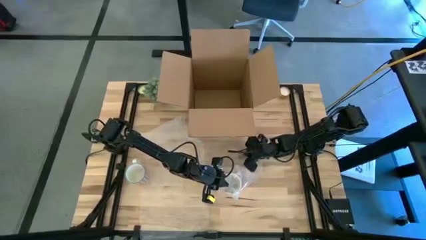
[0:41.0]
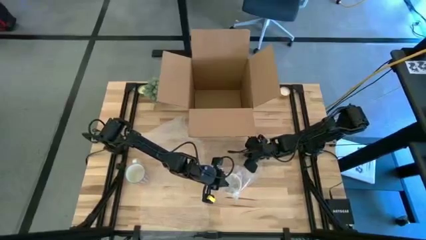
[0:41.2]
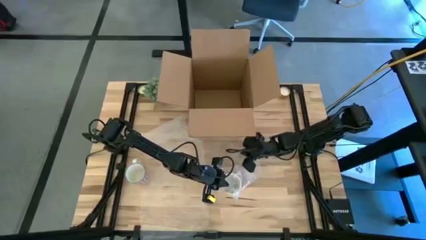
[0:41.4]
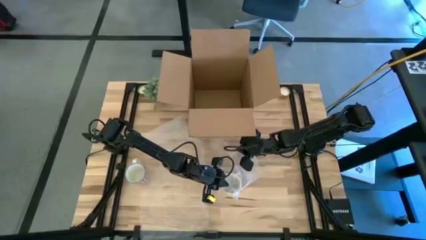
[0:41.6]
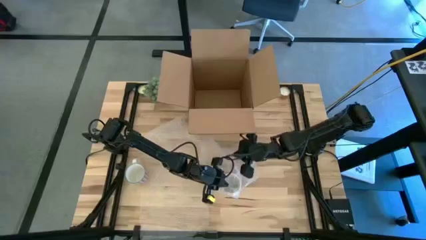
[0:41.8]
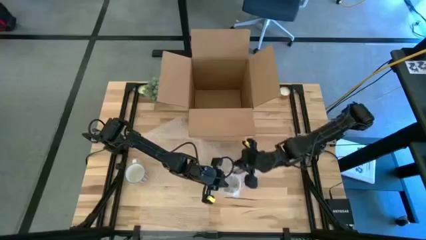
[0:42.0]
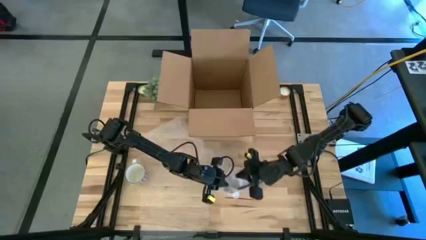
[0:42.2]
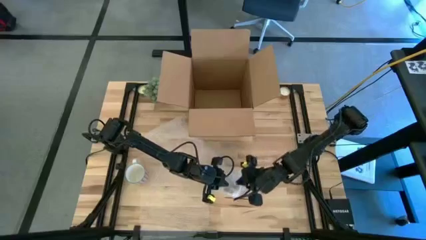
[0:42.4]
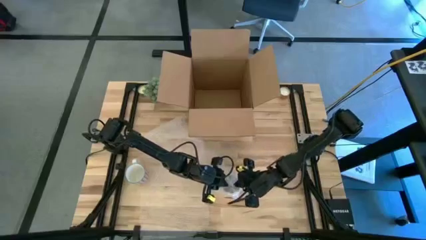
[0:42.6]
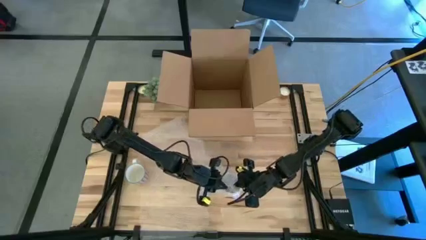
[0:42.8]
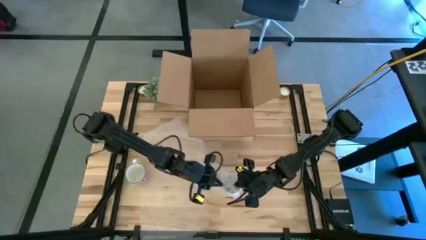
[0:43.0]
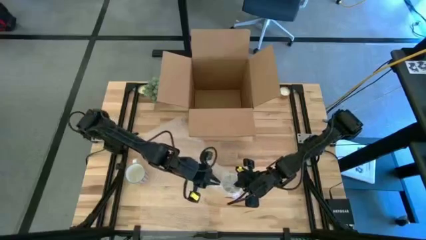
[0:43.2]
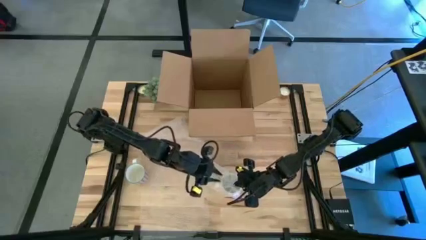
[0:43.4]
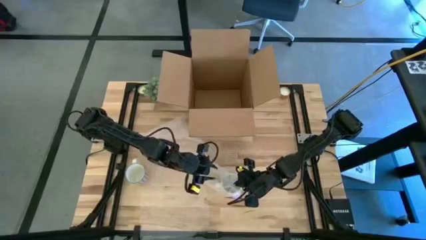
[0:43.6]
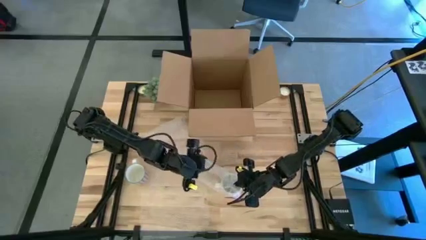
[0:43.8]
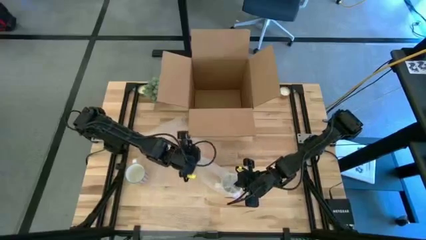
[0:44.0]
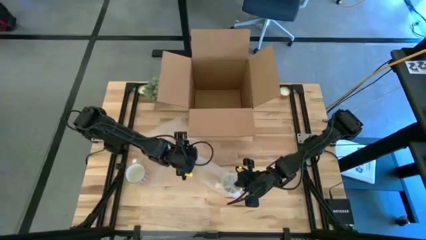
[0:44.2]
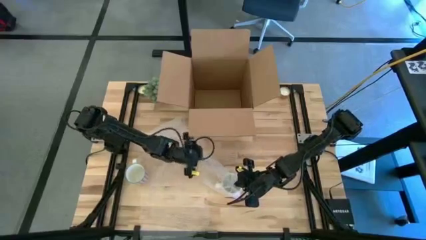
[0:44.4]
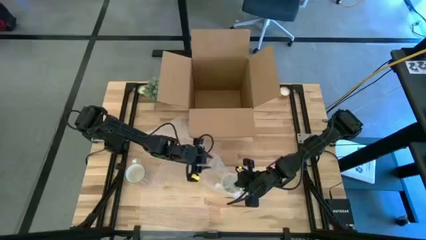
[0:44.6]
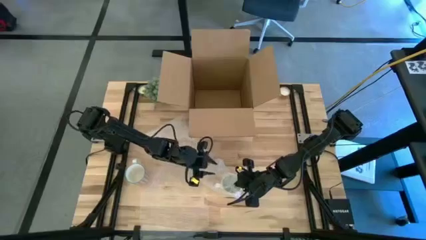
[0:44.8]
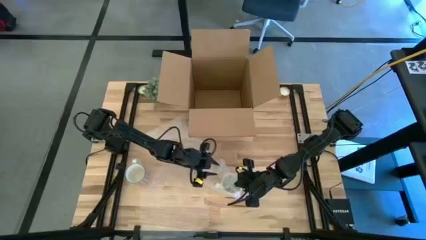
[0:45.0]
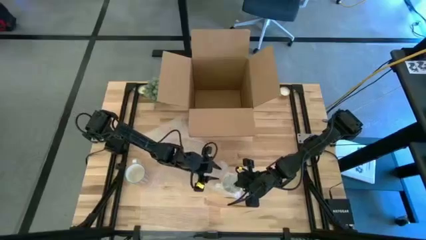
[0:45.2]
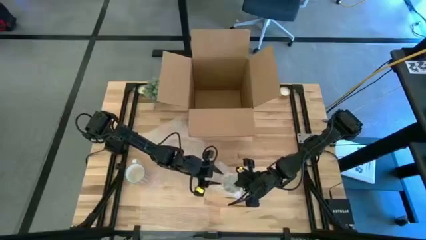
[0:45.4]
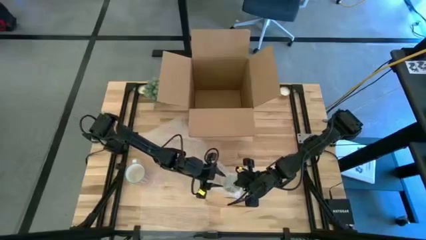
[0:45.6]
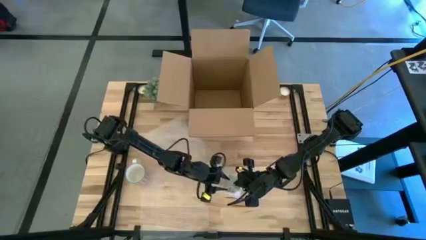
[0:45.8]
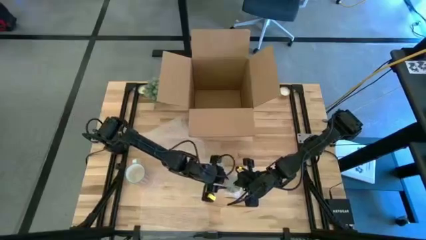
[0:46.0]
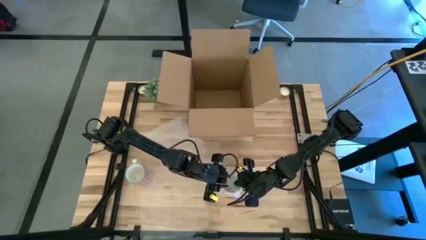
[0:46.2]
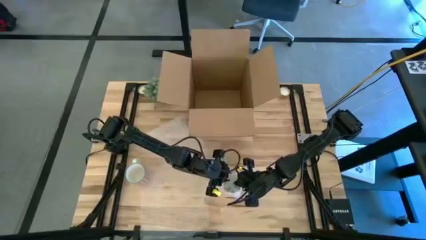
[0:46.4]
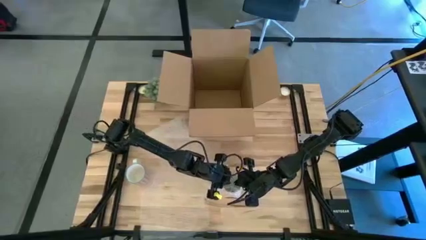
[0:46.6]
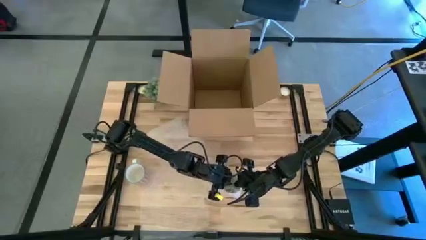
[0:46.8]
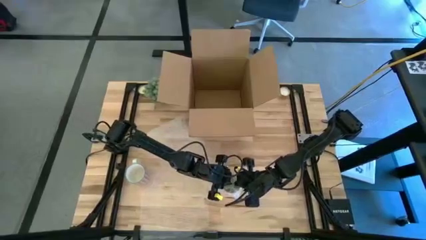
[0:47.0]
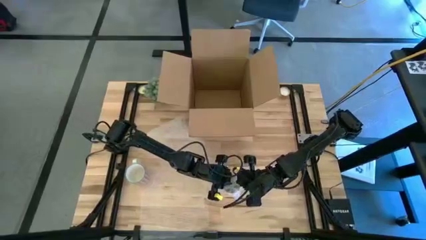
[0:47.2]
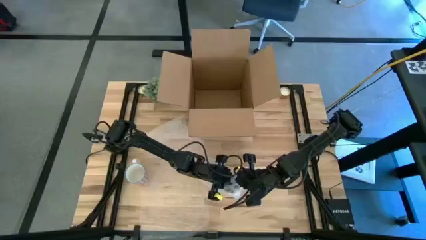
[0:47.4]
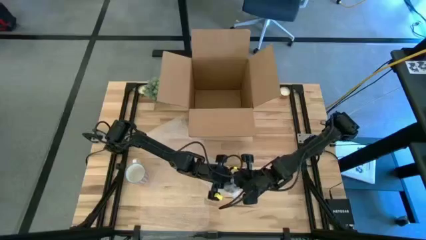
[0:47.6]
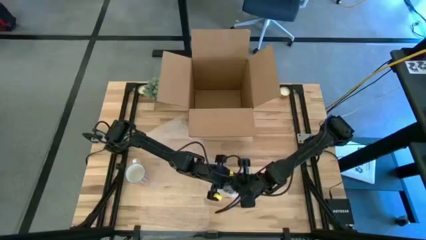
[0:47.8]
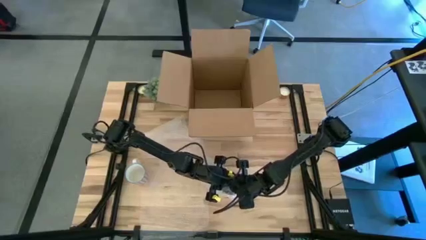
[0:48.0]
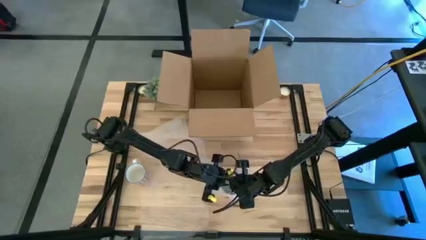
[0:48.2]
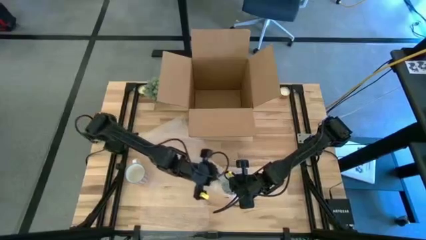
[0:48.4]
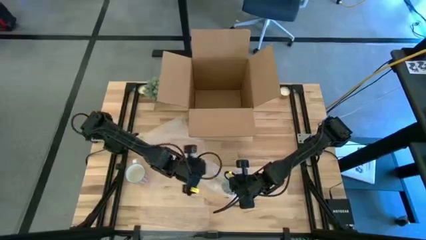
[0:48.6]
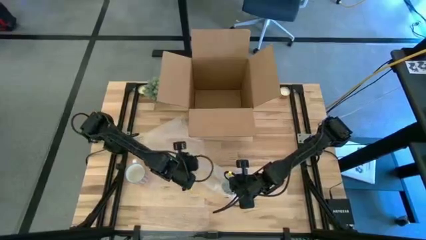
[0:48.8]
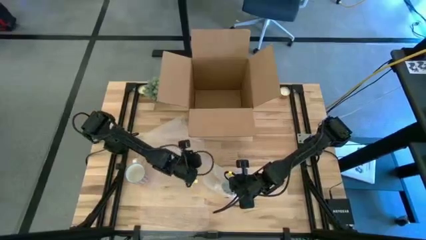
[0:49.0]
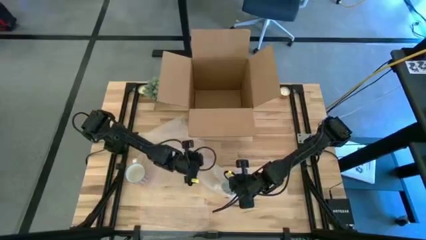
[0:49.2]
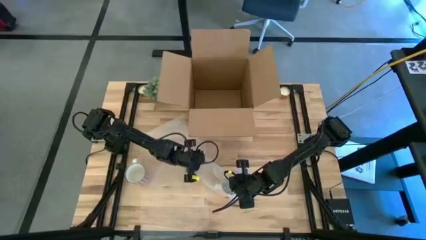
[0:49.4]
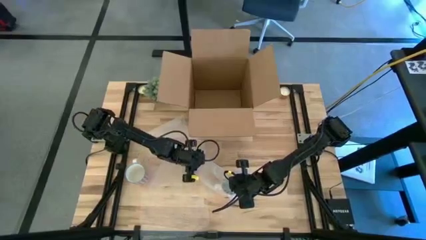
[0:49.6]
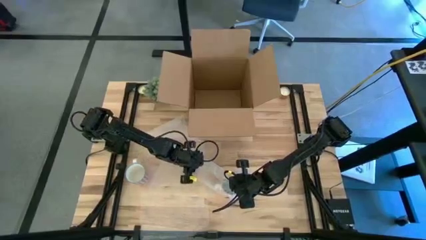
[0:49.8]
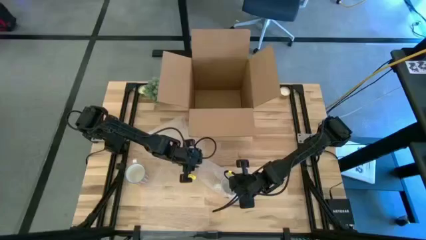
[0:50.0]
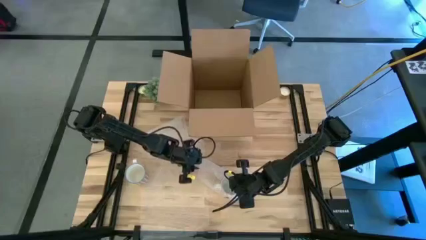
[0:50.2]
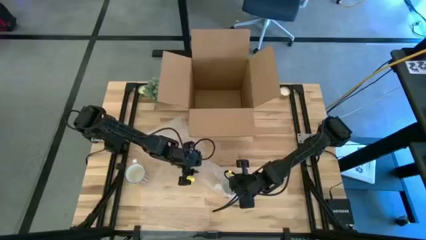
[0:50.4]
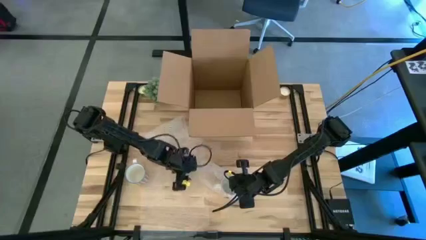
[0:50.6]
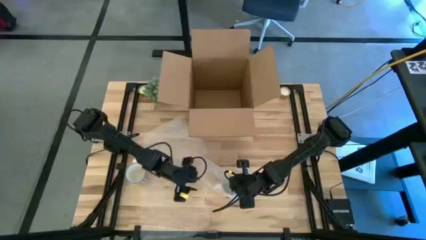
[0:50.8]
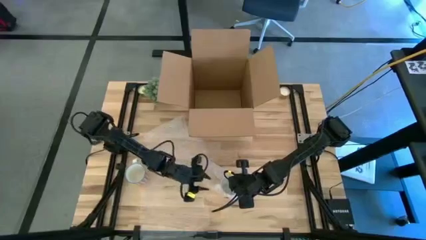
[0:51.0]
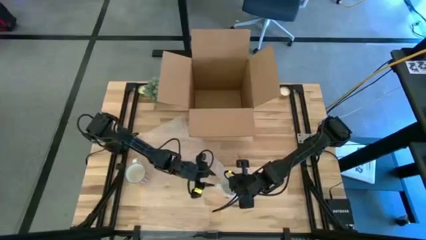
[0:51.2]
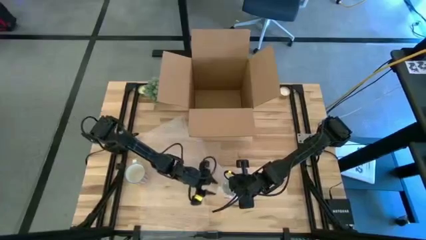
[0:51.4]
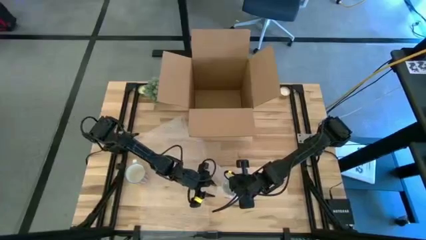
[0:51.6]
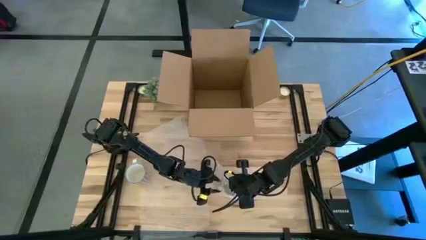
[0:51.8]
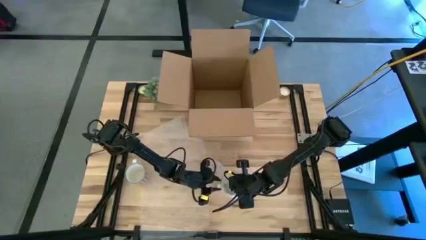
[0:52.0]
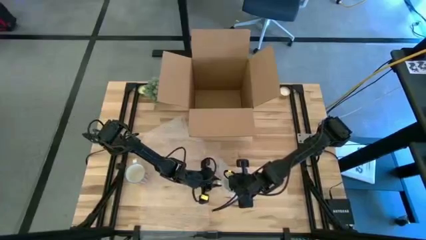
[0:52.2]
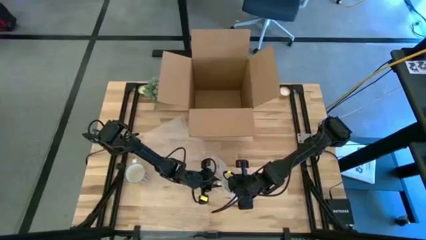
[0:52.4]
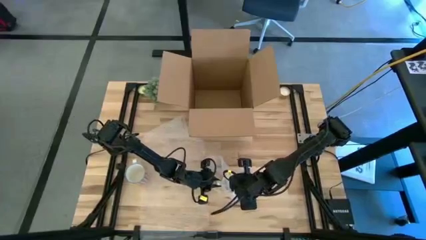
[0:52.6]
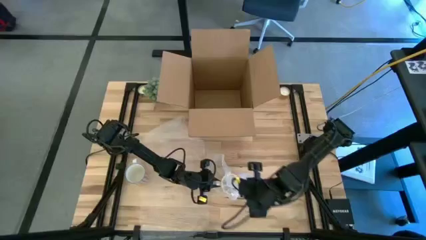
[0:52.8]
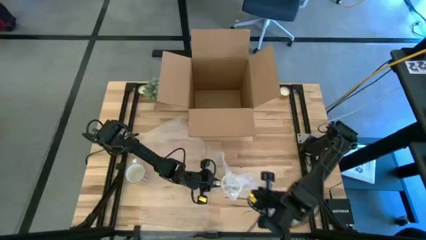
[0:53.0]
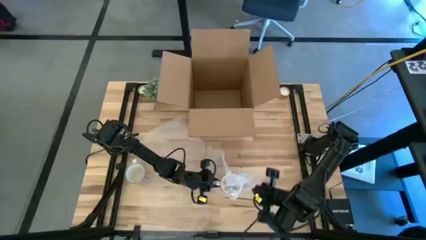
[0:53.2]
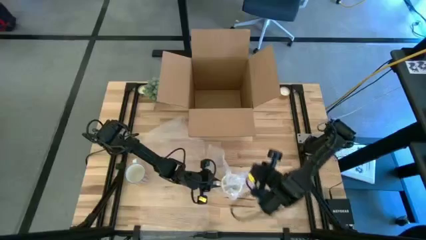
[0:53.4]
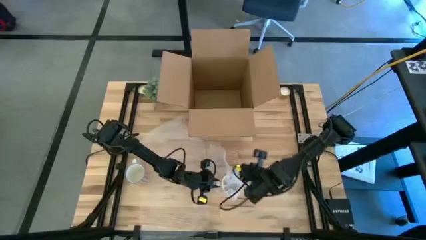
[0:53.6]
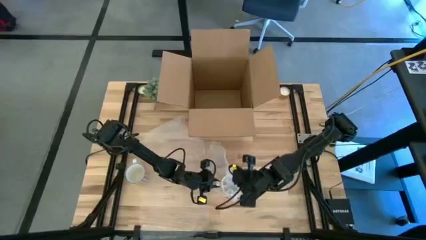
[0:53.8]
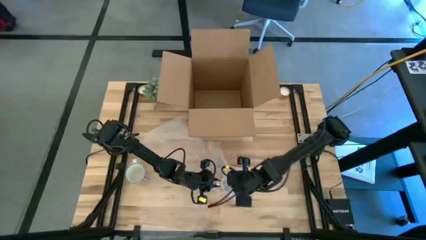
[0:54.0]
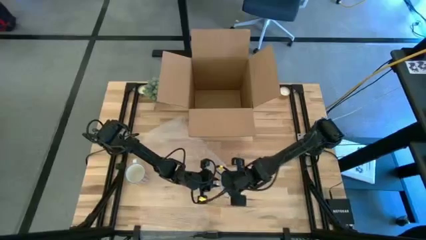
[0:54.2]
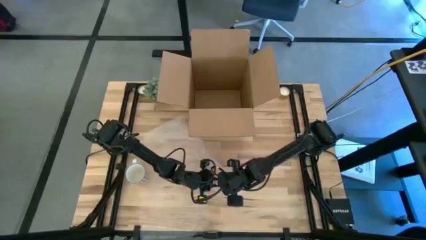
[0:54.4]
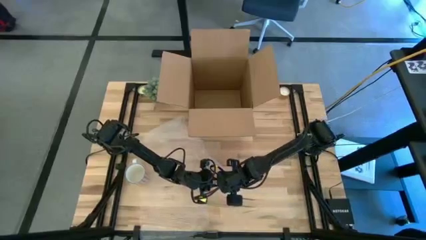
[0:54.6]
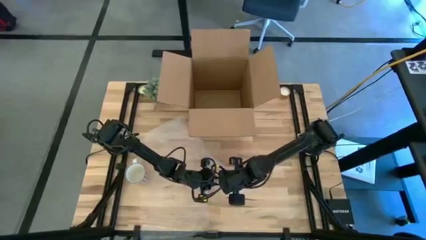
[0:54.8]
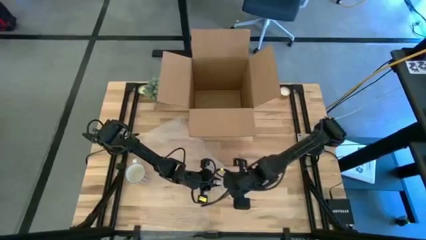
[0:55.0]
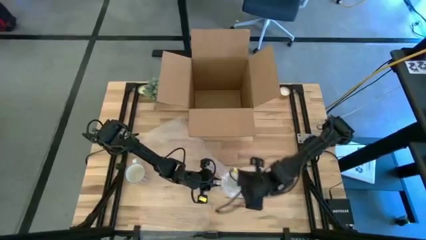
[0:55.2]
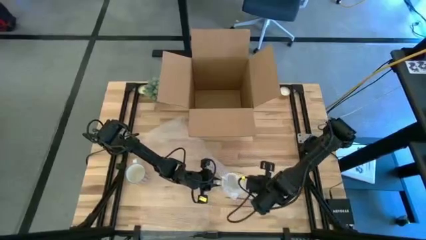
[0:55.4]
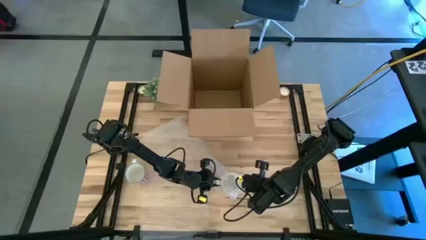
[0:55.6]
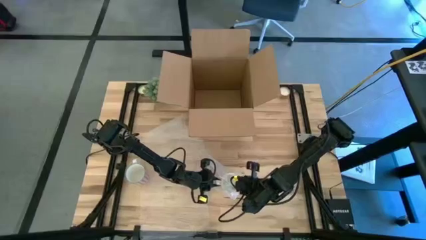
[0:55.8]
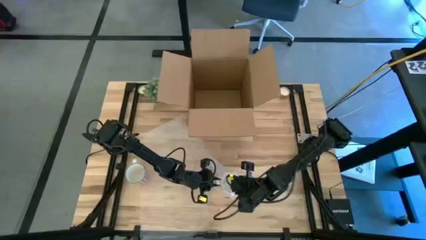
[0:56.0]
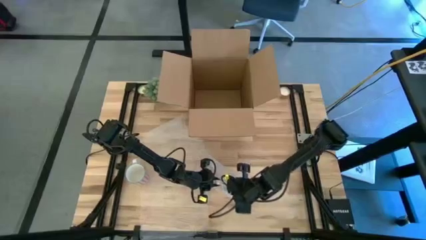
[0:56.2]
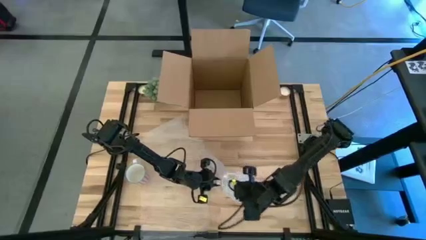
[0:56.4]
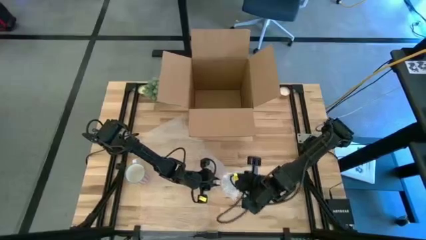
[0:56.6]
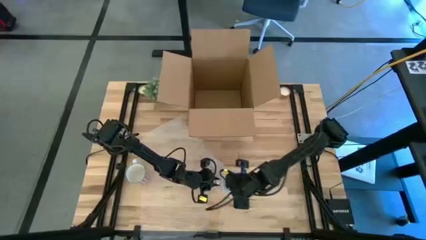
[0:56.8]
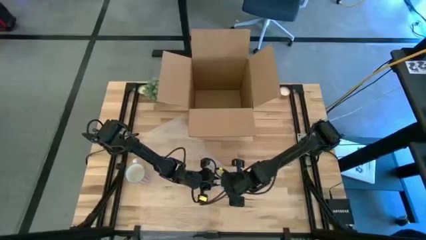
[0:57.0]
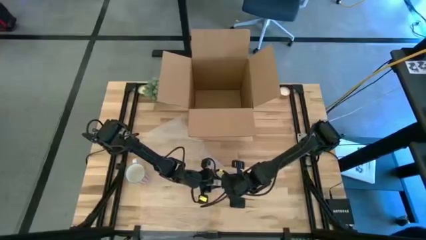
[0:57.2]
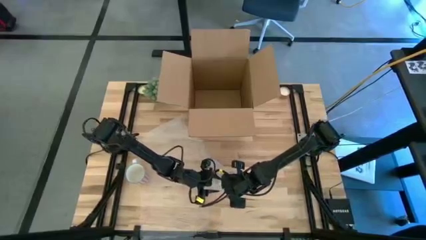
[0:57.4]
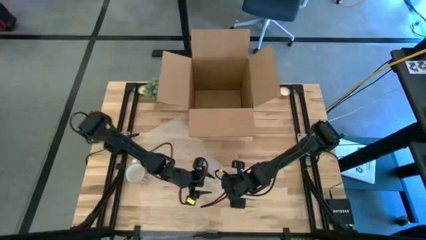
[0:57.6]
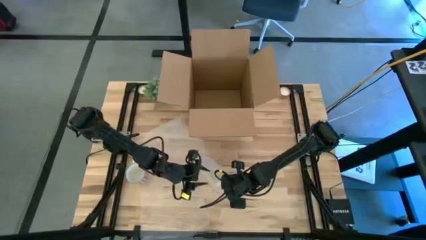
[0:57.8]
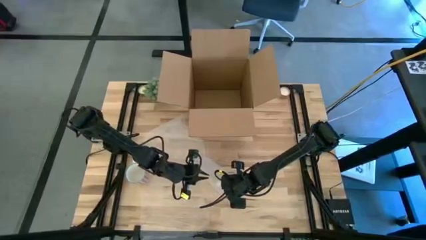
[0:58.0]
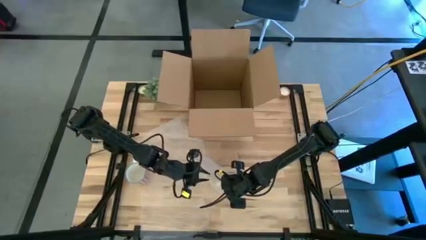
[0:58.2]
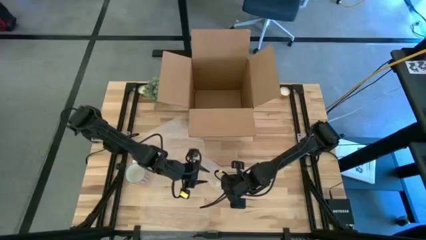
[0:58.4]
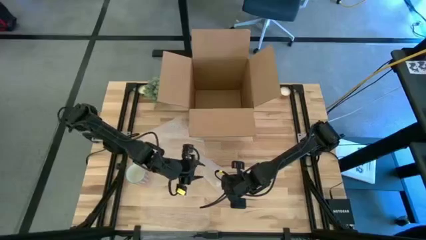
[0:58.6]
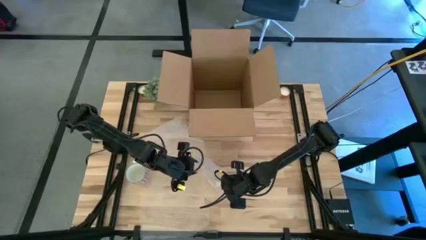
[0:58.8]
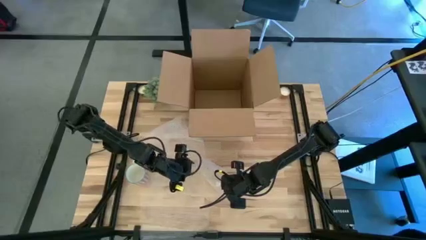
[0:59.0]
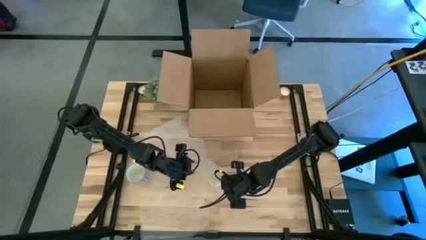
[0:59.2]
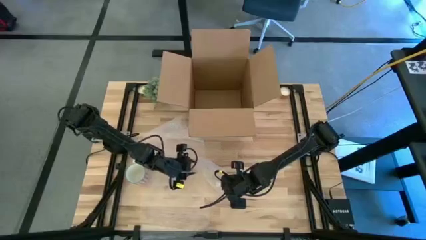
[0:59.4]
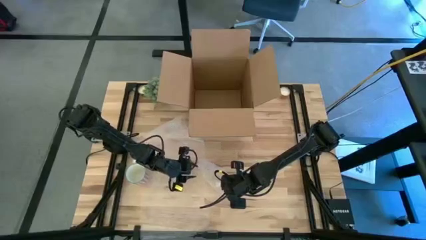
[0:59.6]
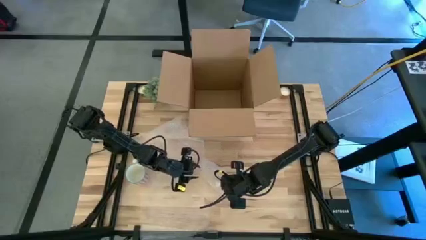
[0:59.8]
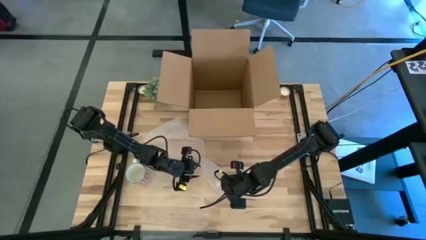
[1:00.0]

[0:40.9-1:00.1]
Task: wrap mug
Wrap the orange mug with the bubble wrap
